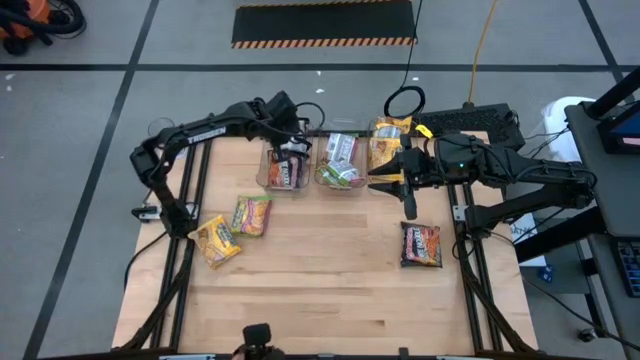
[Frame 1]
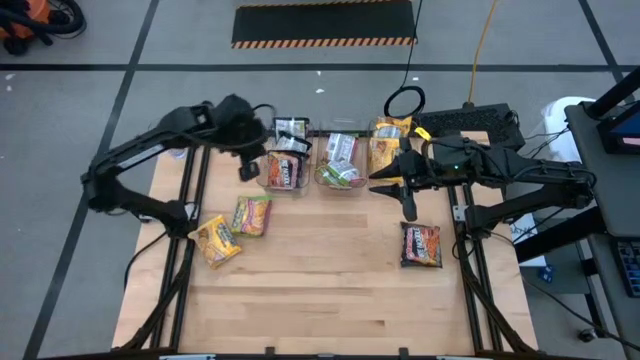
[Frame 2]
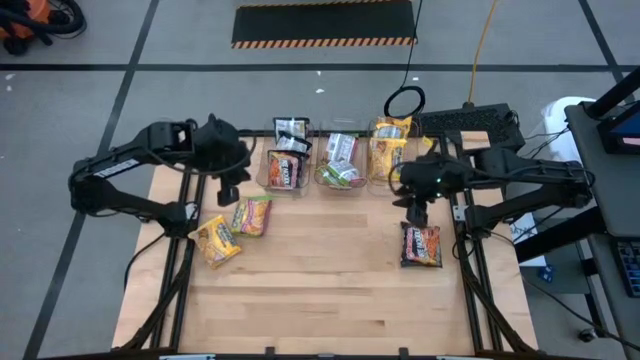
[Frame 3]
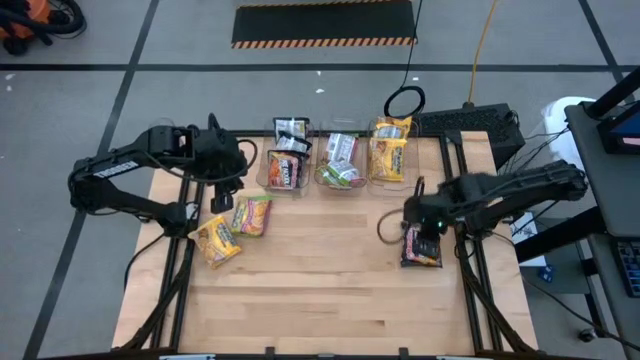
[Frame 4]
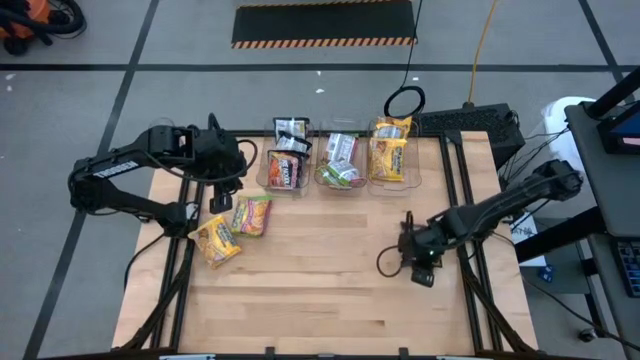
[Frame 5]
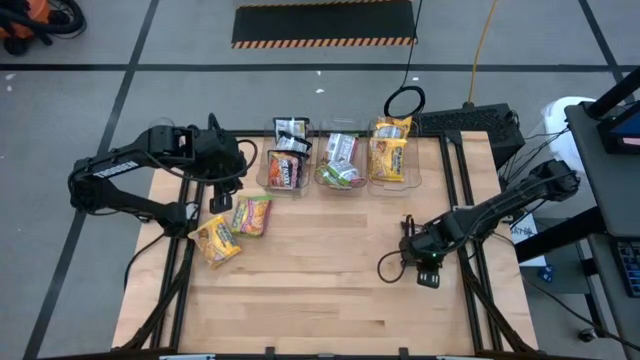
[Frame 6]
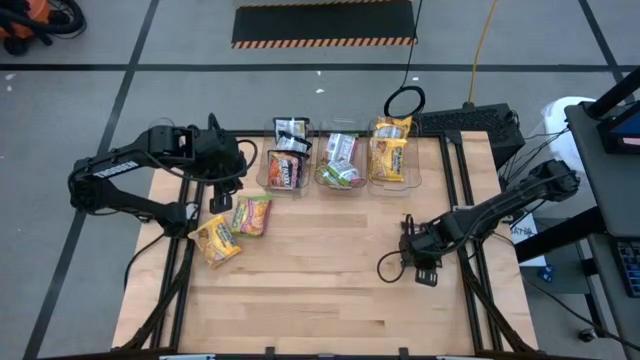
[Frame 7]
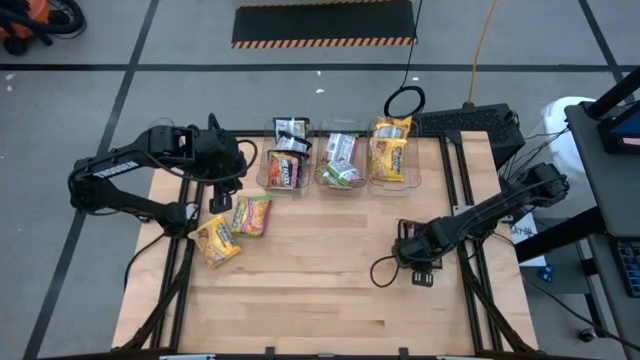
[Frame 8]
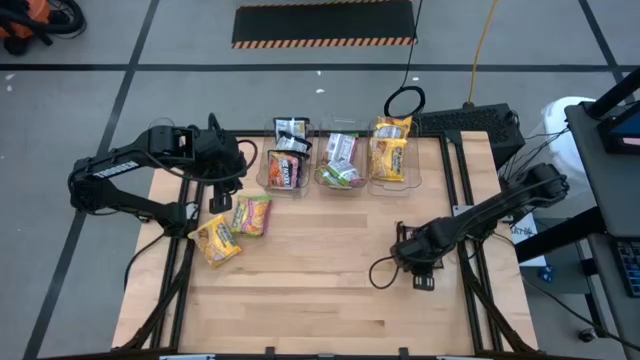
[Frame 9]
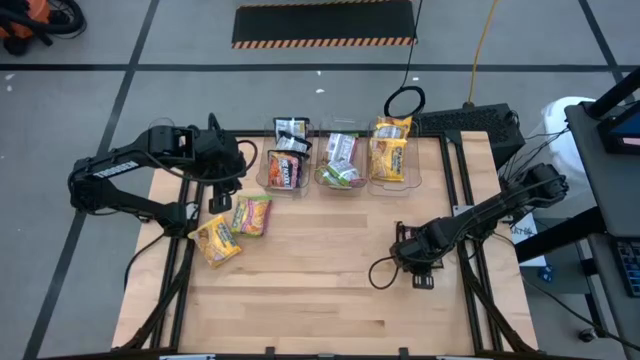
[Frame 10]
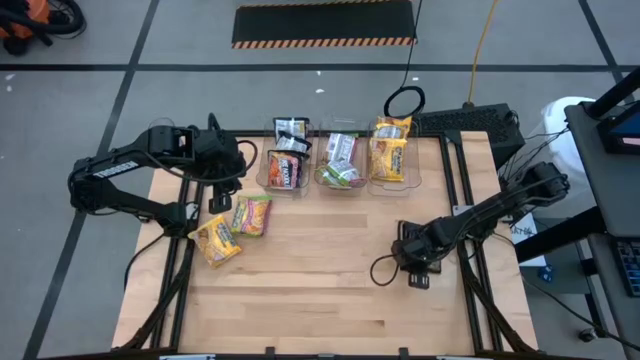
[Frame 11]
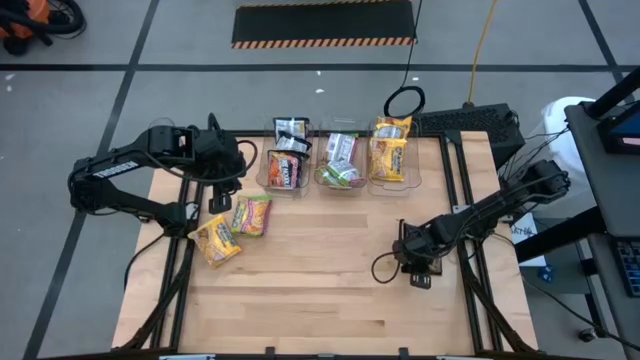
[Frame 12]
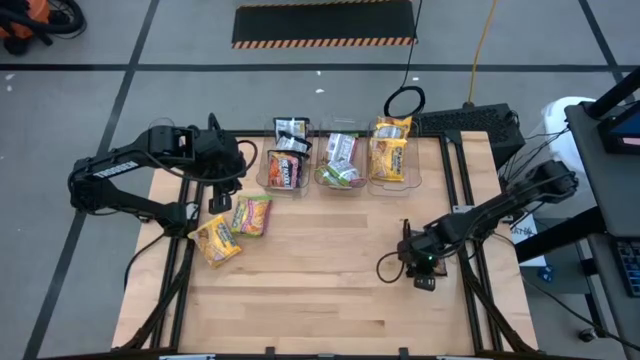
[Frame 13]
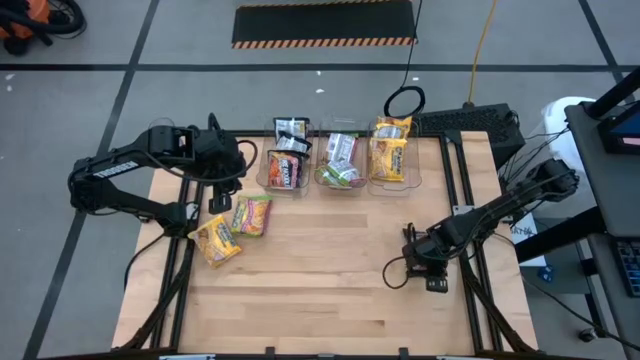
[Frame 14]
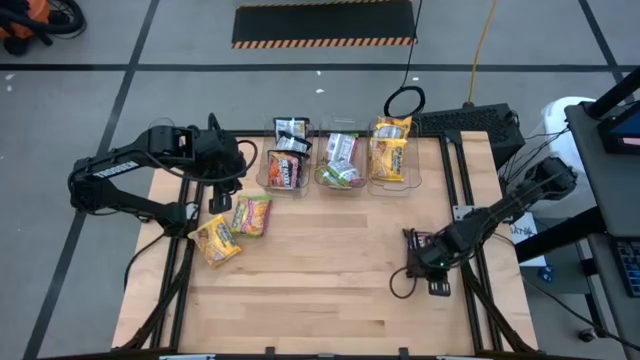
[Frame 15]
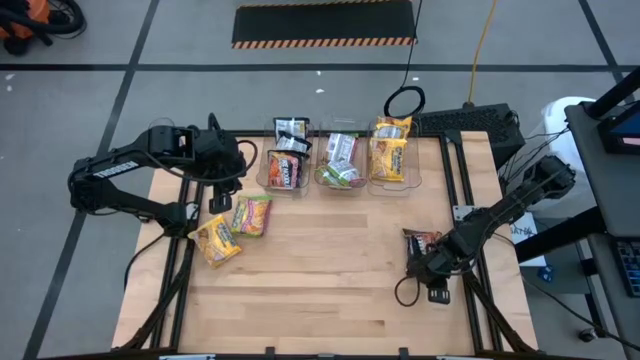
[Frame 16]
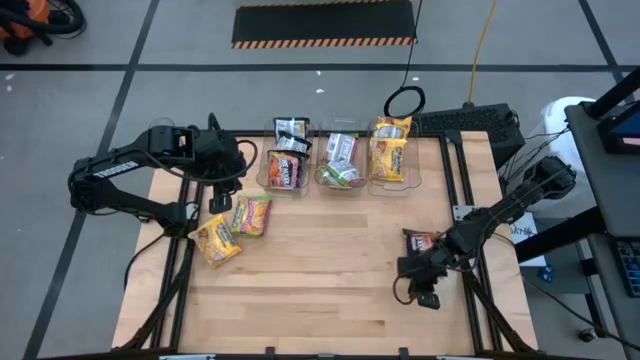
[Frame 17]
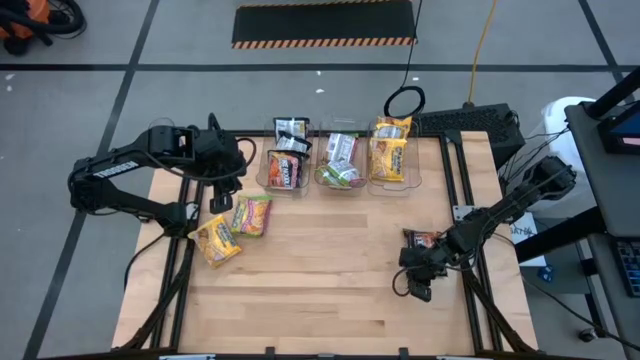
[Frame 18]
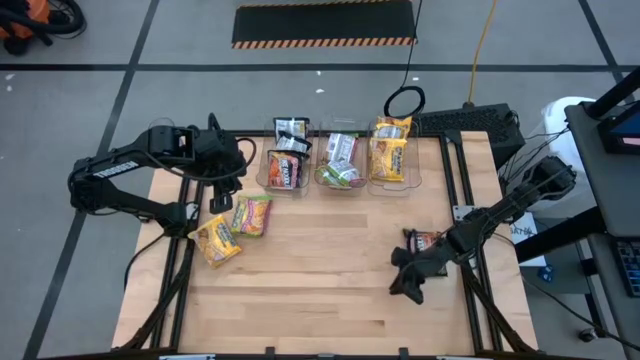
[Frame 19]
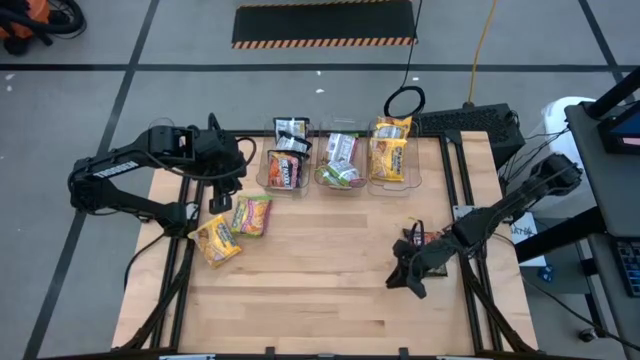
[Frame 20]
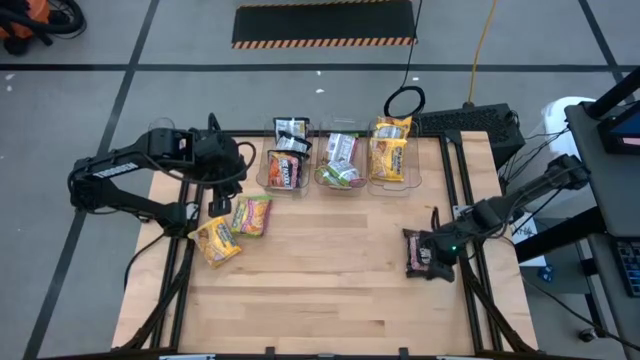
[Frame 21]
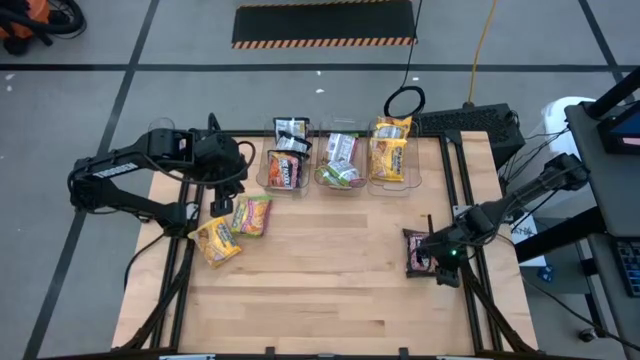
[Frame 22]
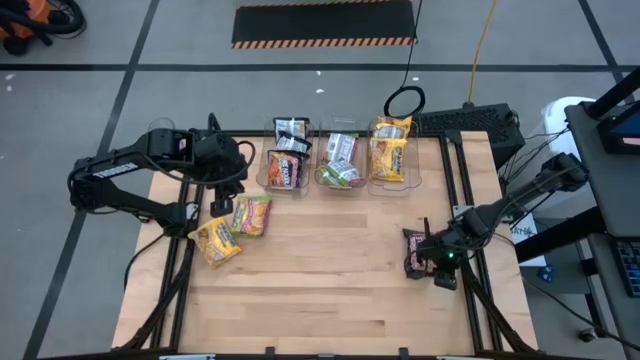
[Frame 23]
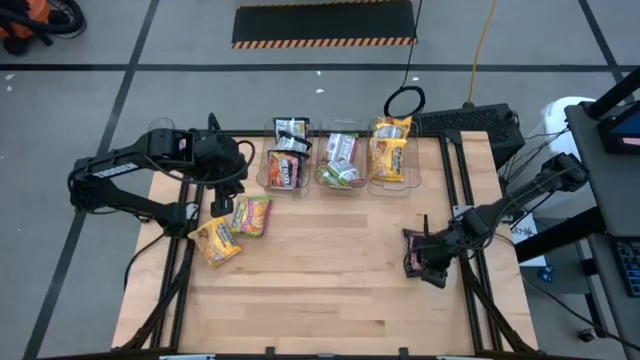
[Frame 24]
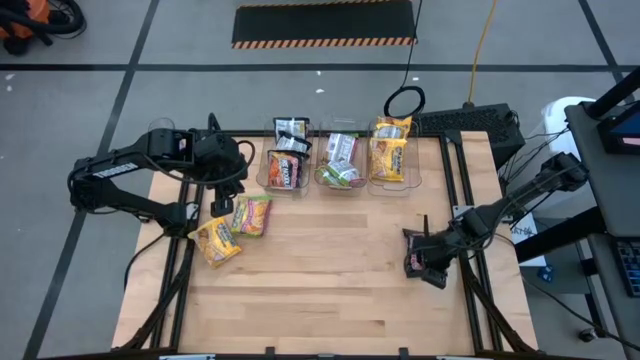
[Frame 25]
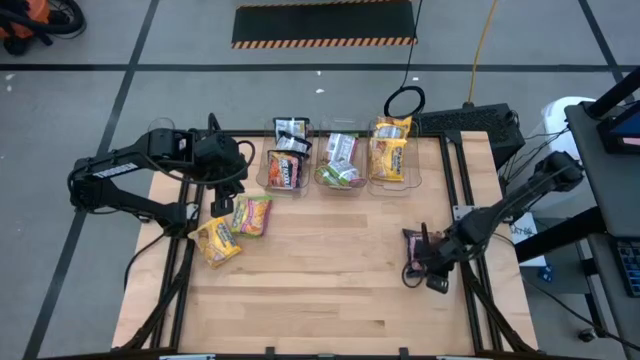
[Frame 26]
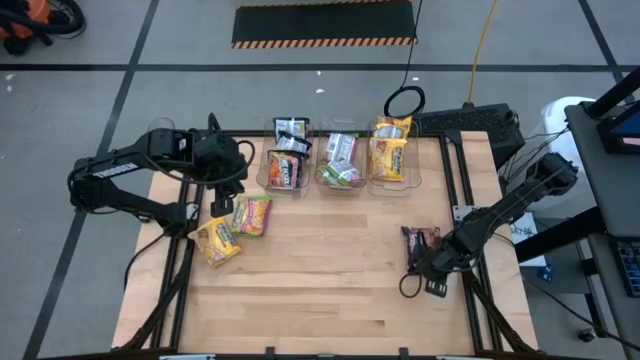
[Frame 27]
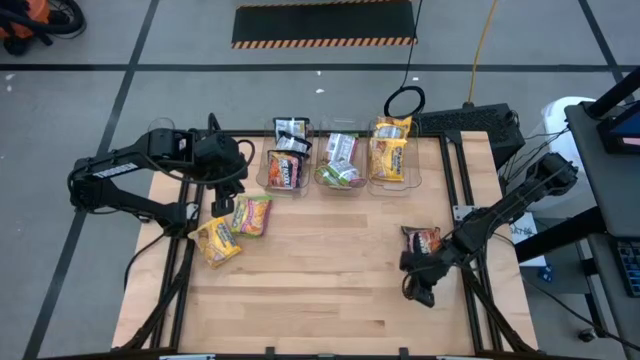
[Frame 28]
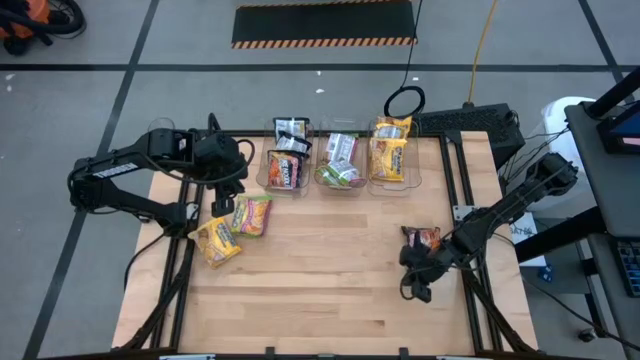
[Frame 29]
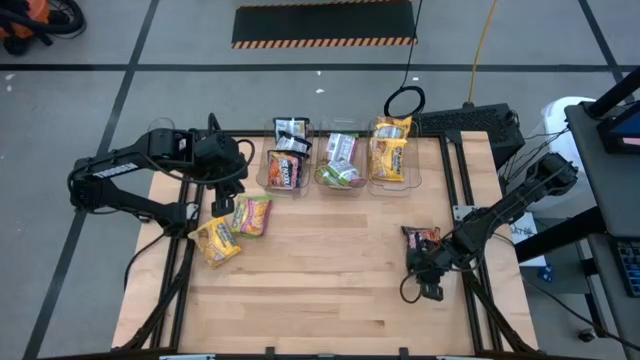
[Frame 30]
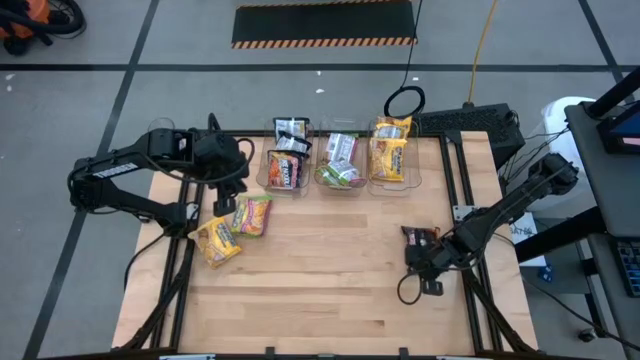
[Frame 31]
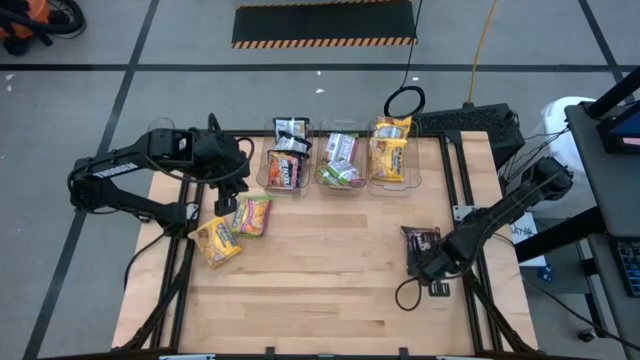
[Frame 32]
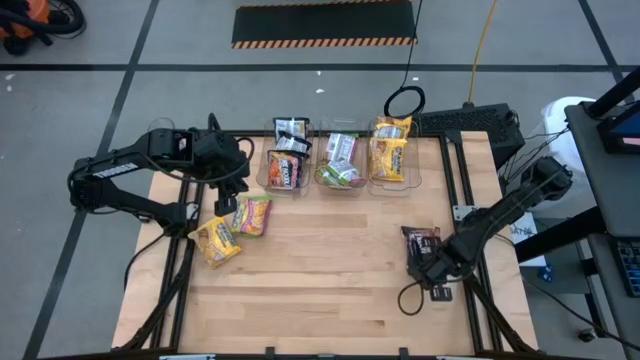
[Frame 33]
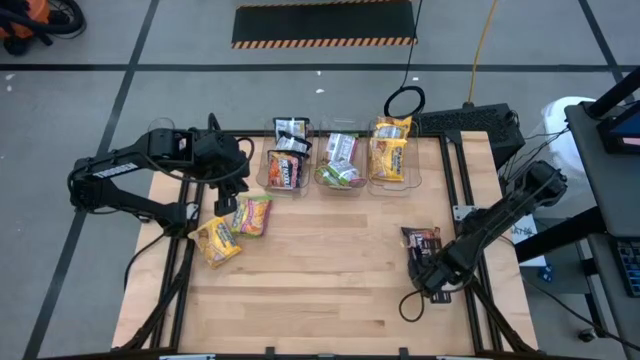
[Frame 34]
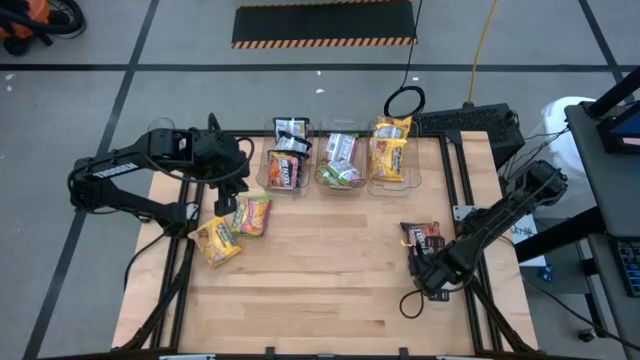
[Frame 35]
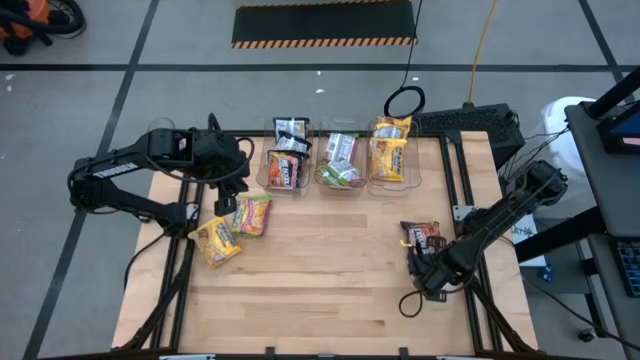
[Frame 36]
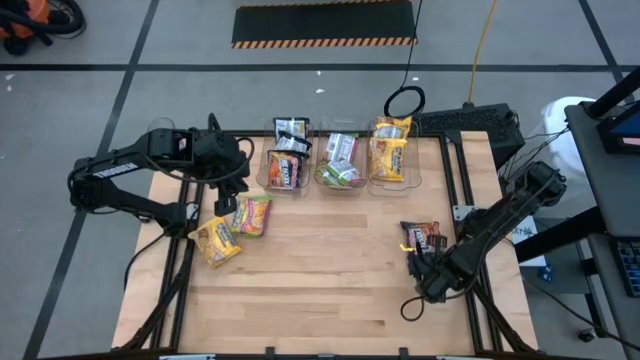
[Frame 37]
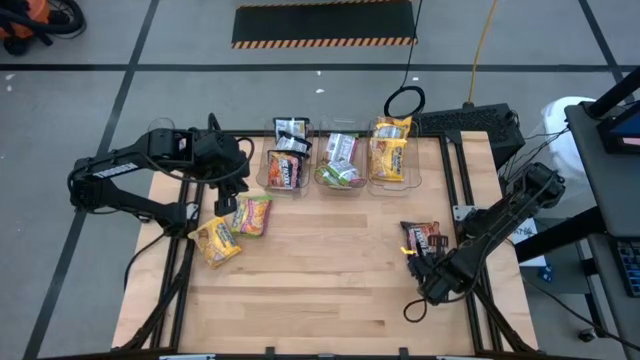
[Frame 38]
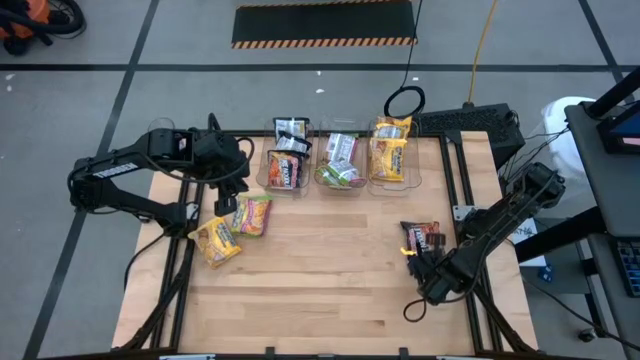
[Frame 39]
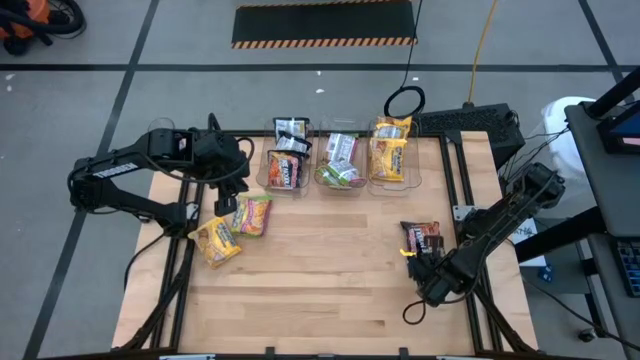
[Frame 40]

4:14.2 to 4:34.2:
Task: Sort Maruchan noodles
Put the black noodle pack into the left transparent bin

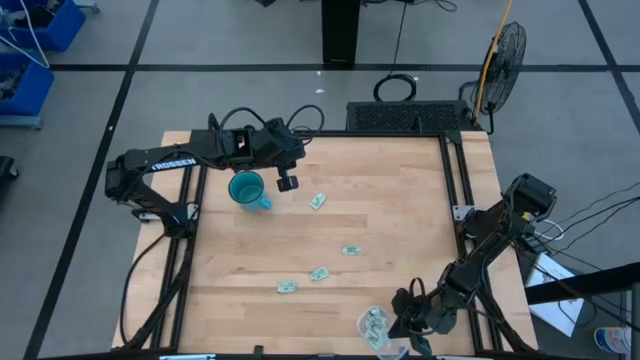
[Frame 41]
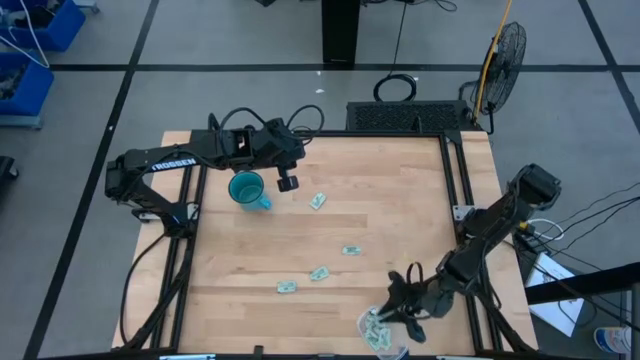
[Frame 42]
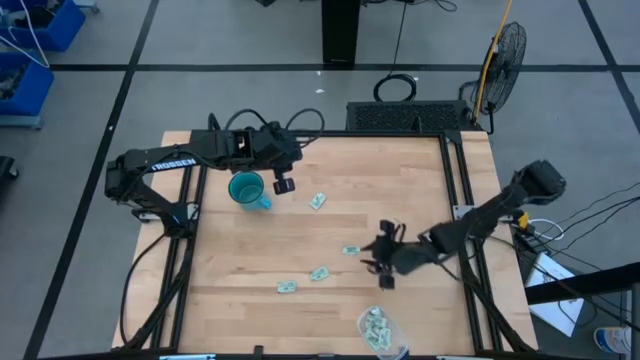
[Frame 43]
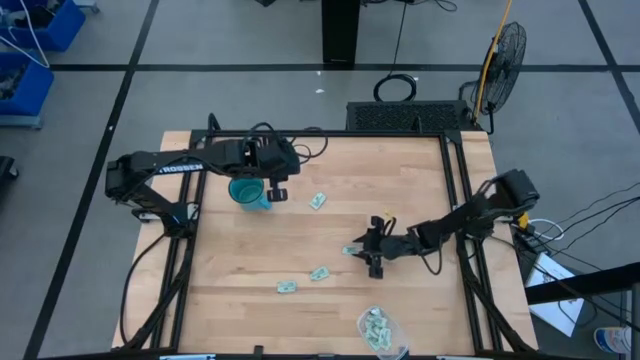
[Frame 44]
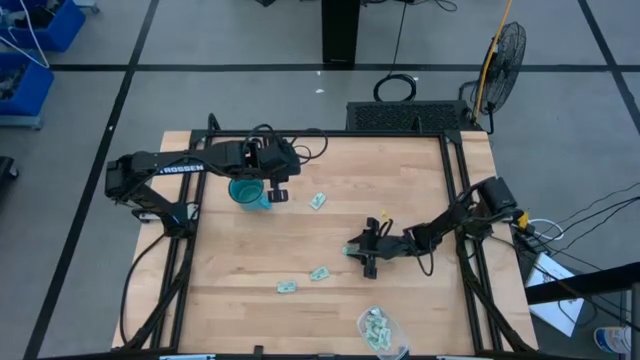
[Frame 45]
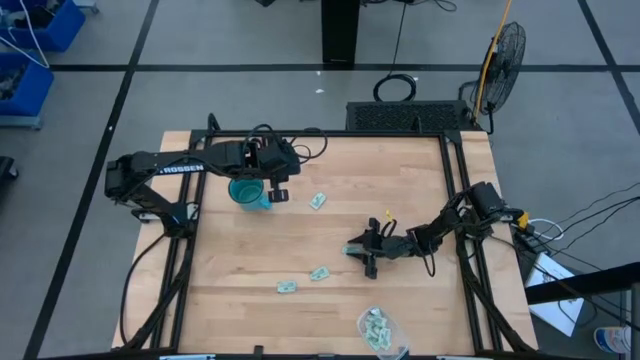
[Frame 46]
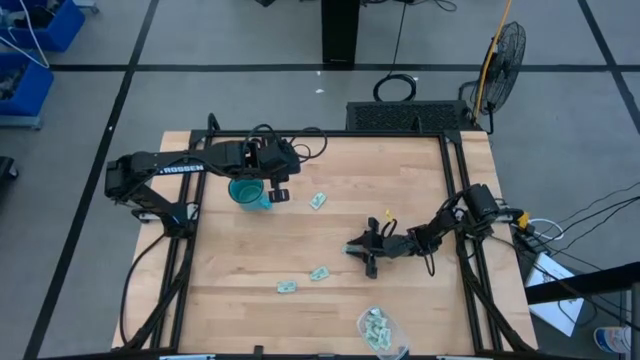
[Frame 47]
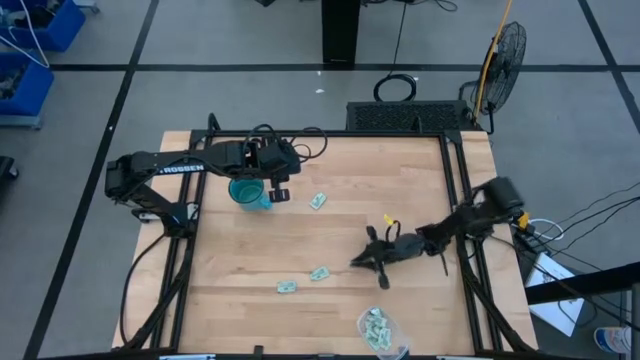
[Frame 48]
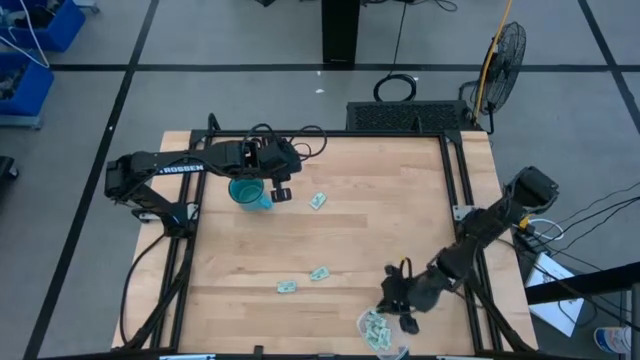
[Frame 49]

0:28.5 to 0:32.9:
Task: Pick and place Stevia / Truvia into bins
Put the green stevia packet into the transparent container
